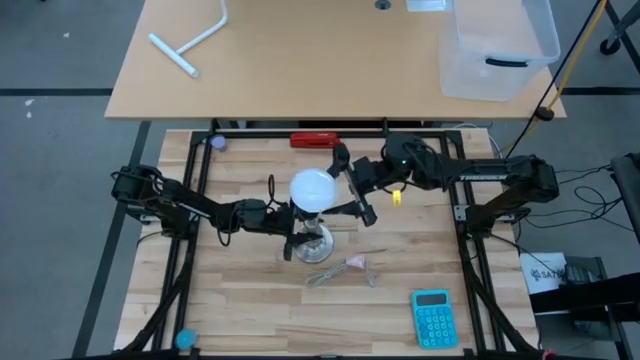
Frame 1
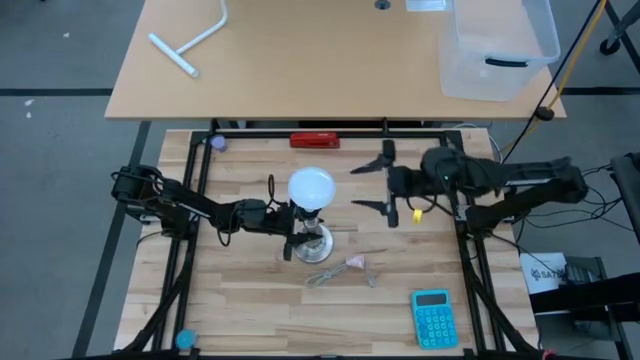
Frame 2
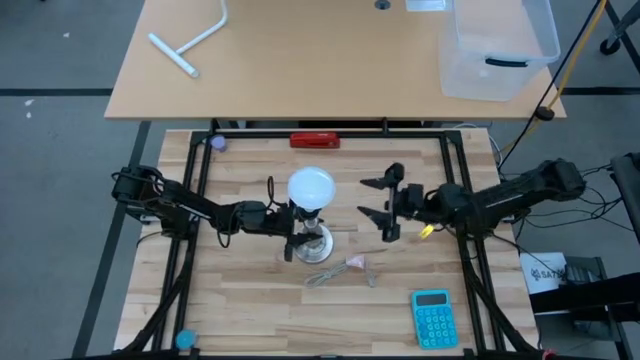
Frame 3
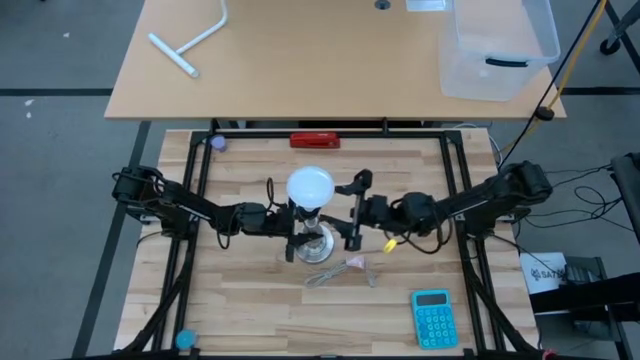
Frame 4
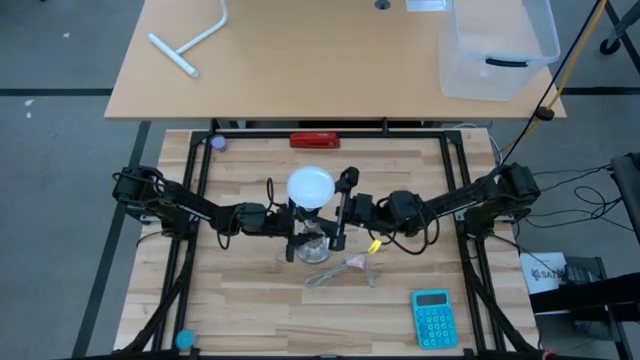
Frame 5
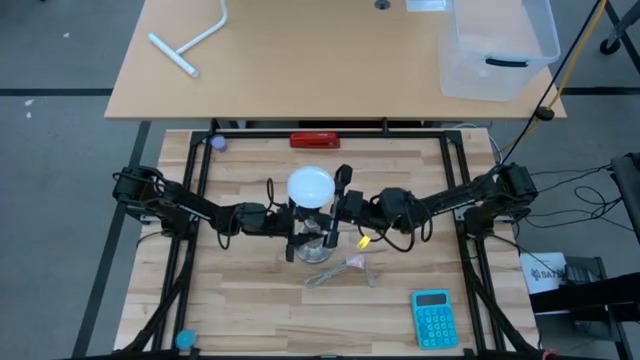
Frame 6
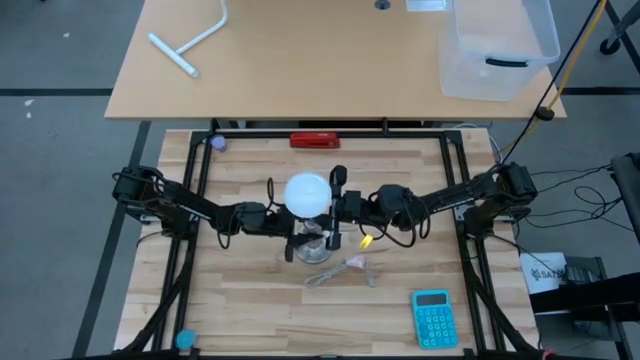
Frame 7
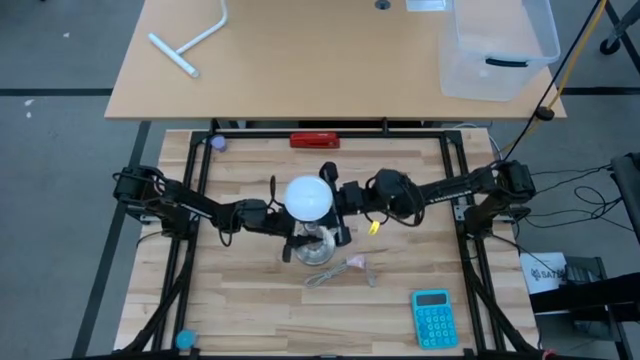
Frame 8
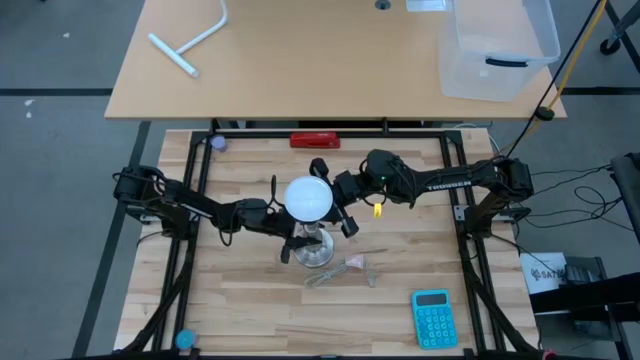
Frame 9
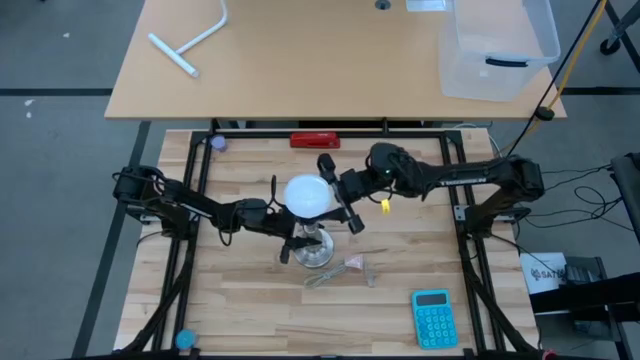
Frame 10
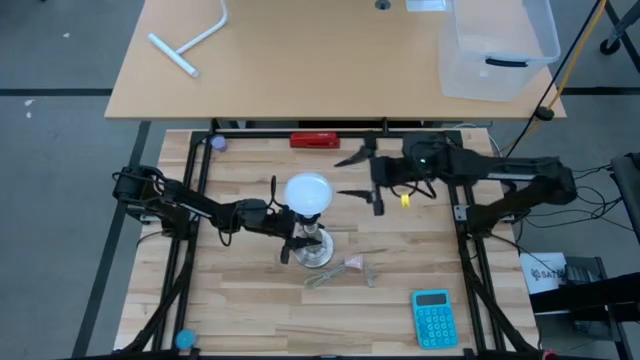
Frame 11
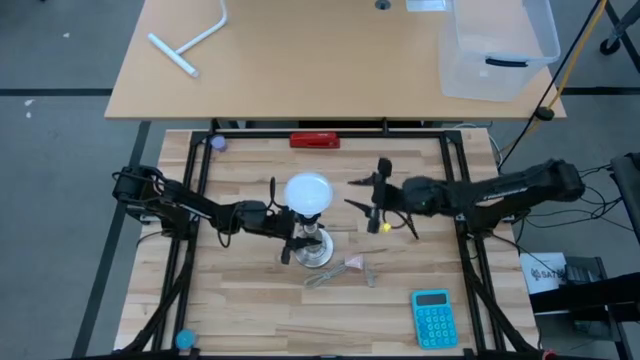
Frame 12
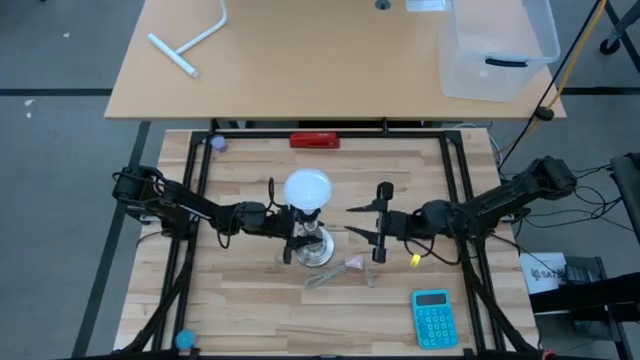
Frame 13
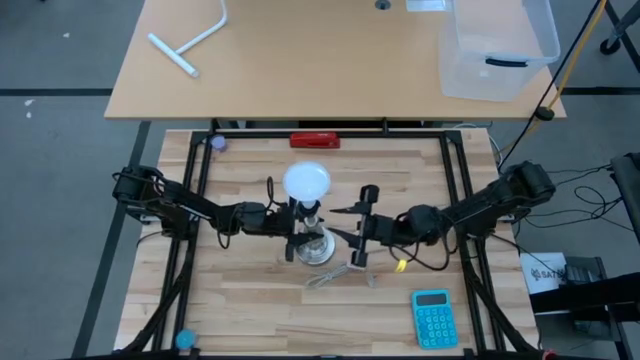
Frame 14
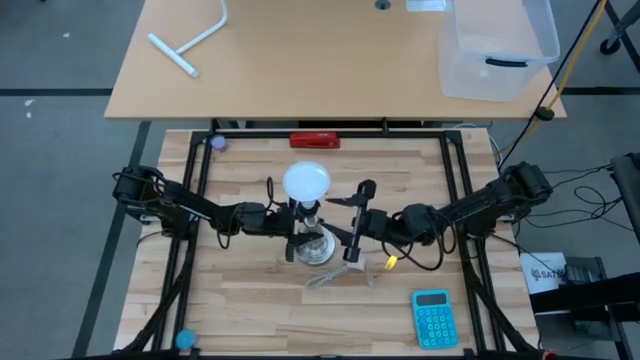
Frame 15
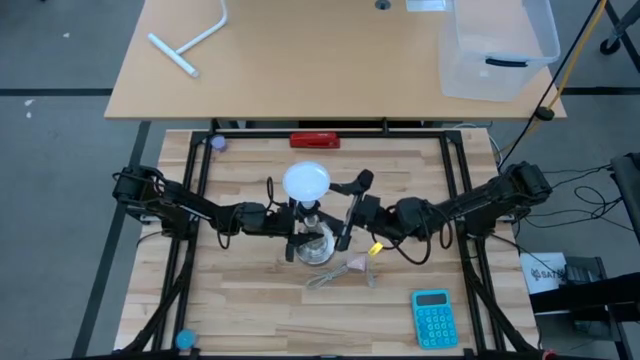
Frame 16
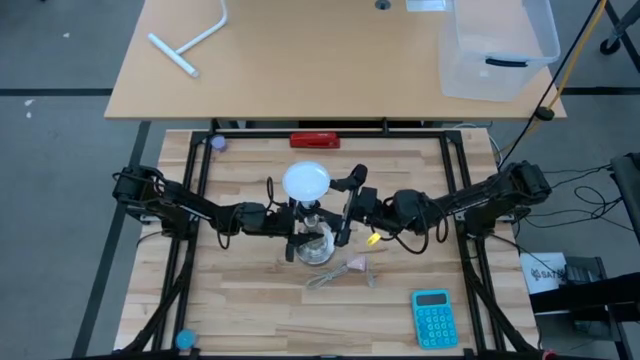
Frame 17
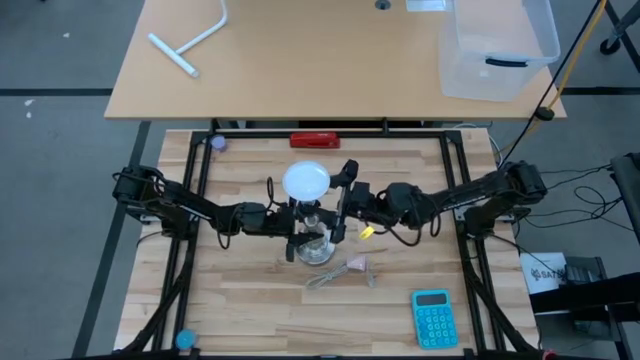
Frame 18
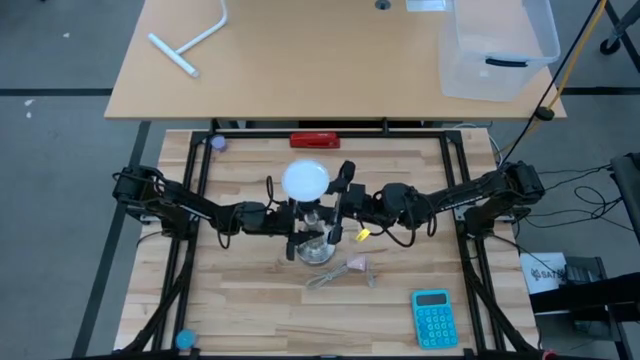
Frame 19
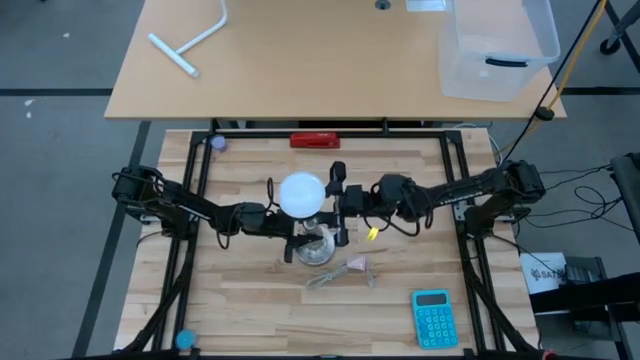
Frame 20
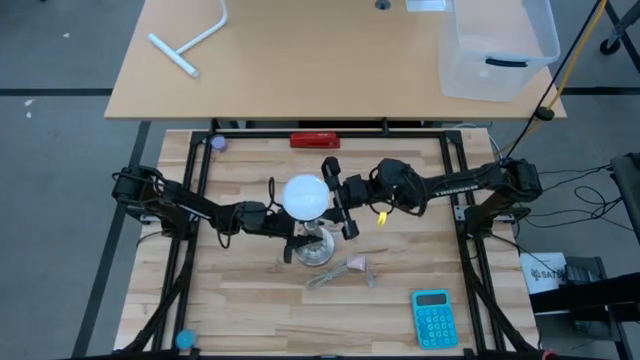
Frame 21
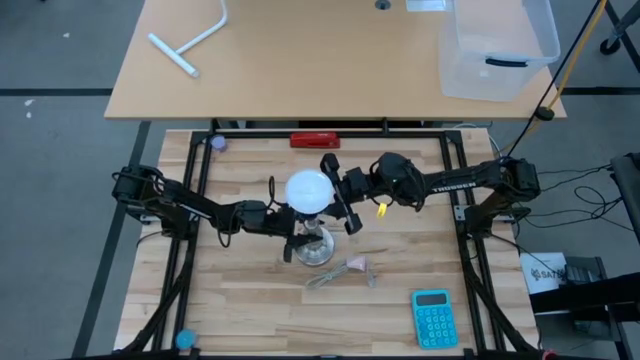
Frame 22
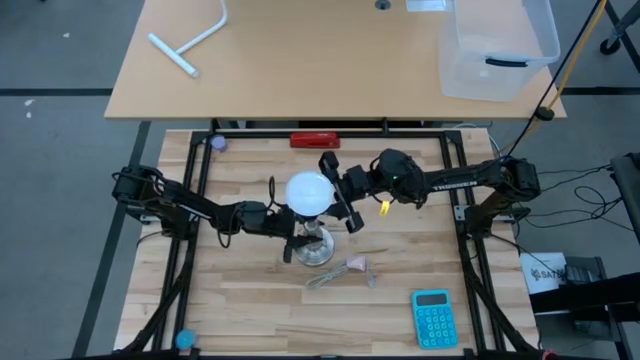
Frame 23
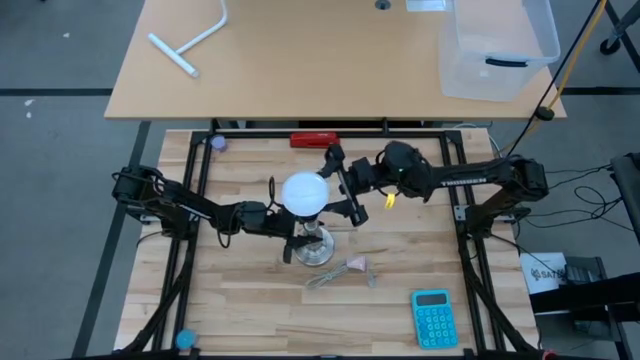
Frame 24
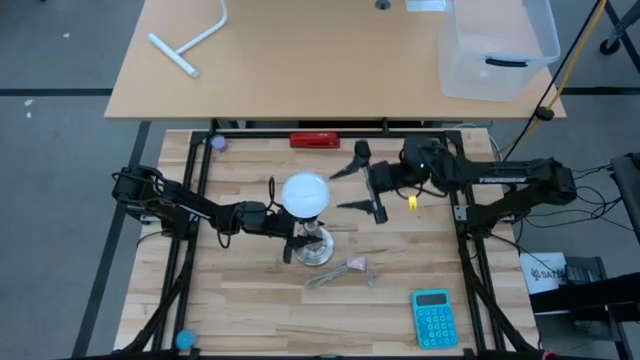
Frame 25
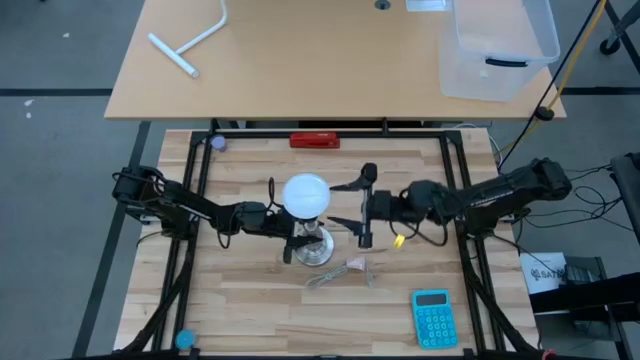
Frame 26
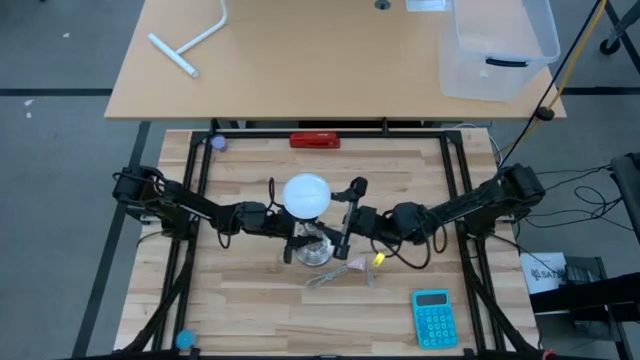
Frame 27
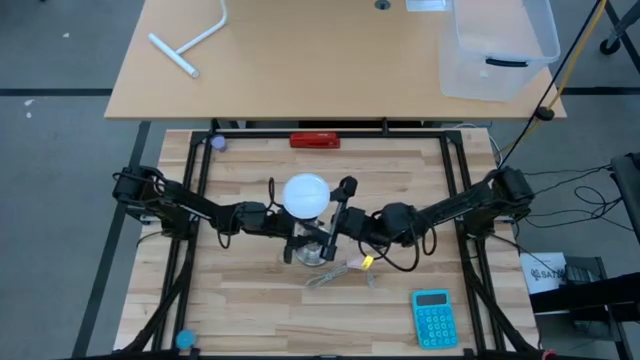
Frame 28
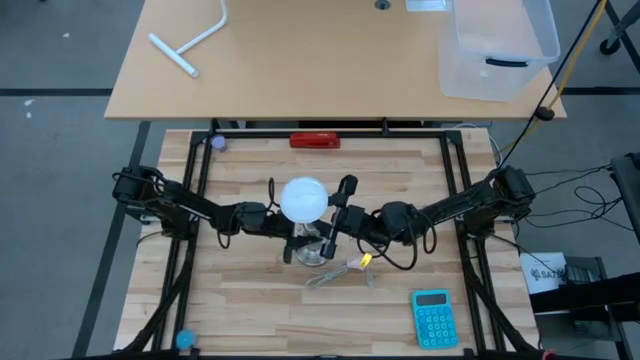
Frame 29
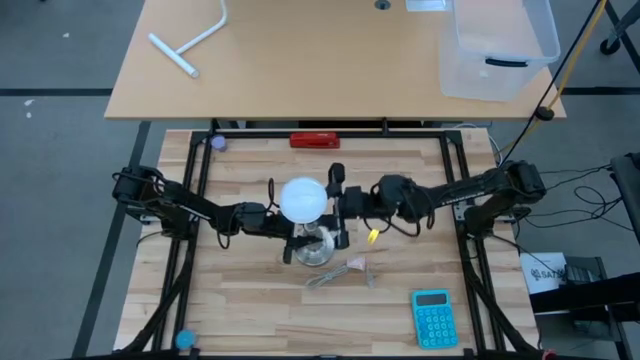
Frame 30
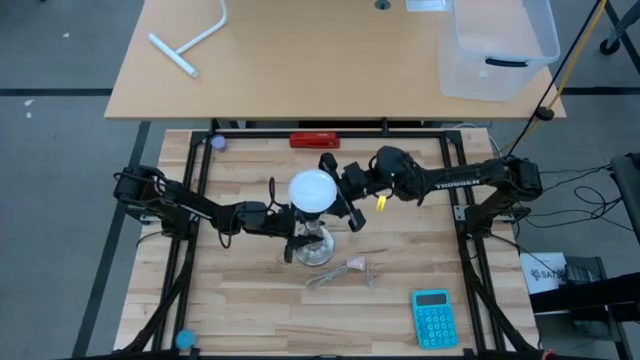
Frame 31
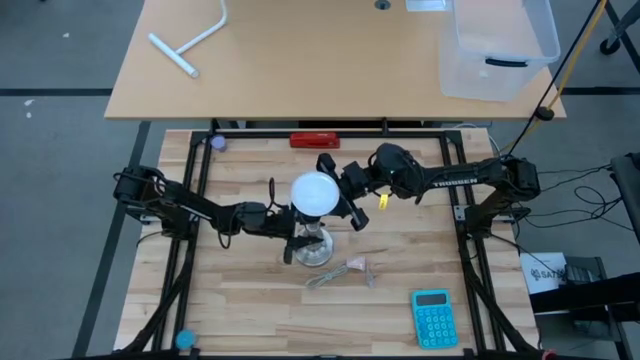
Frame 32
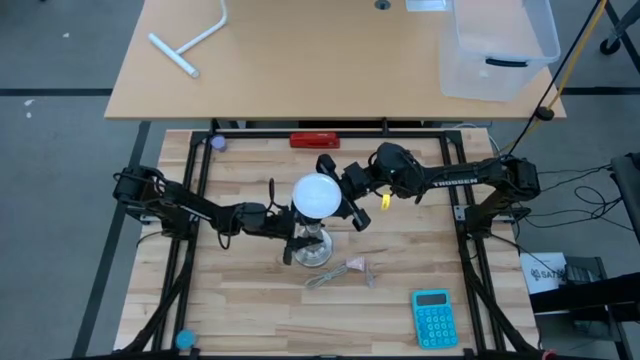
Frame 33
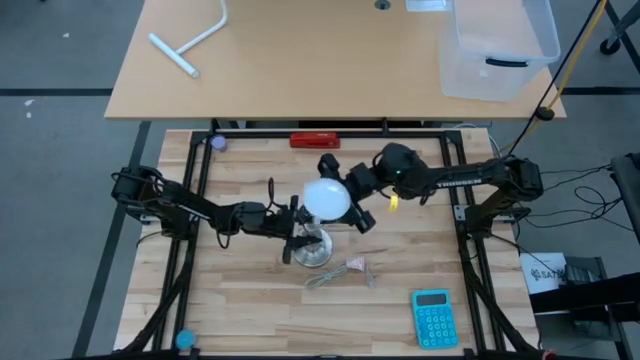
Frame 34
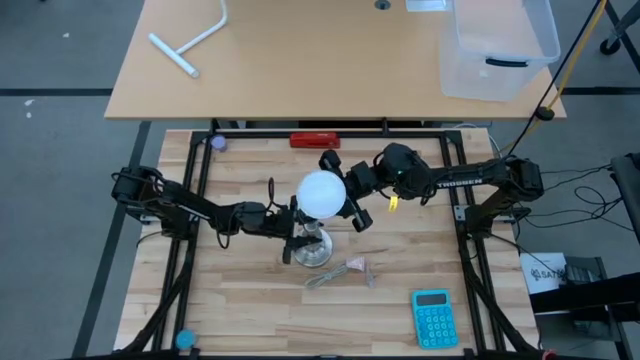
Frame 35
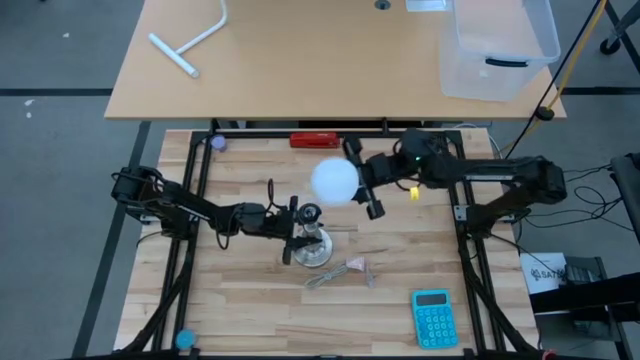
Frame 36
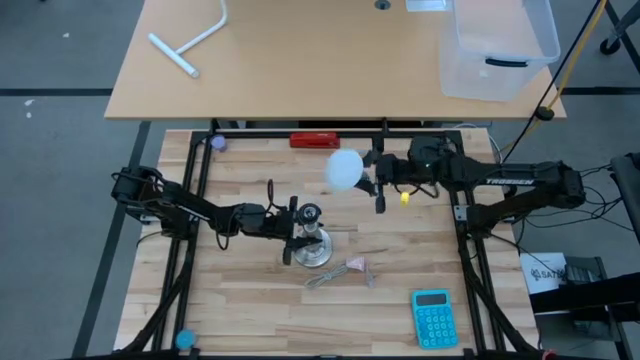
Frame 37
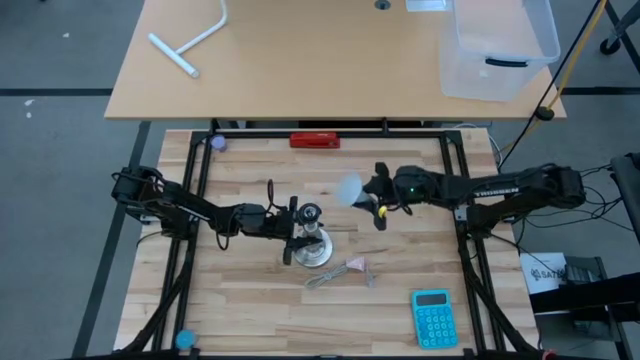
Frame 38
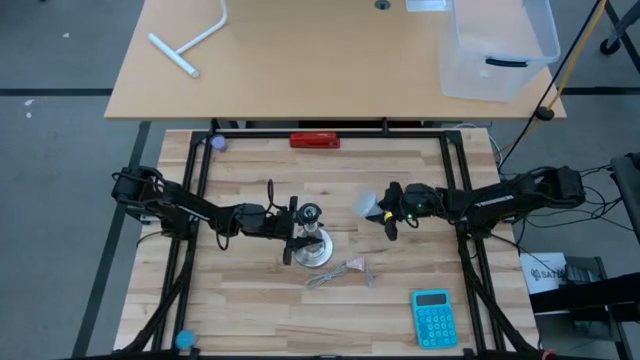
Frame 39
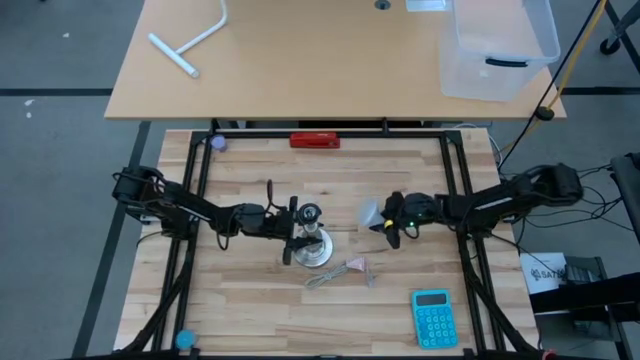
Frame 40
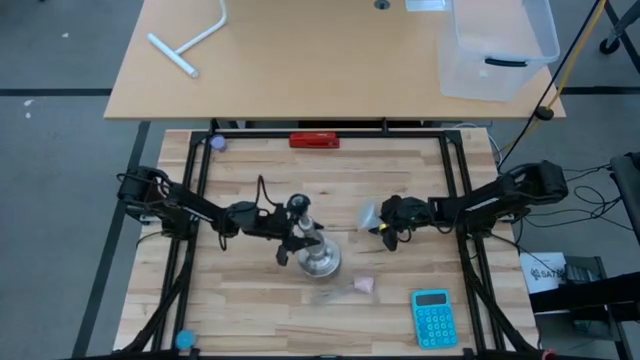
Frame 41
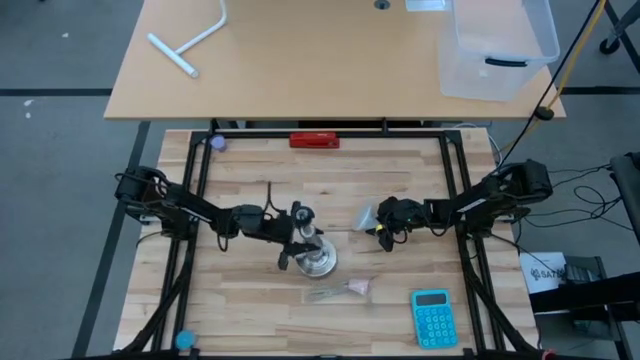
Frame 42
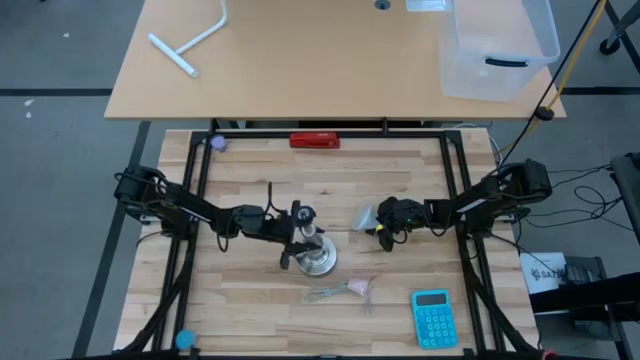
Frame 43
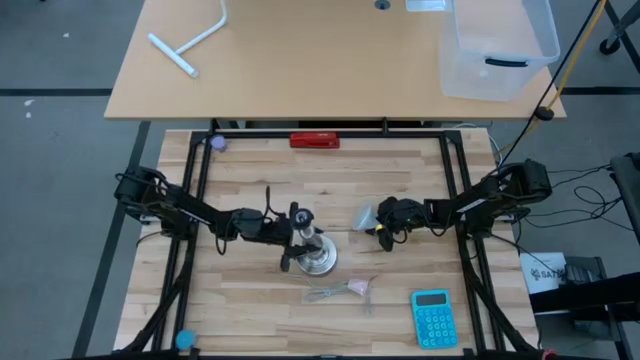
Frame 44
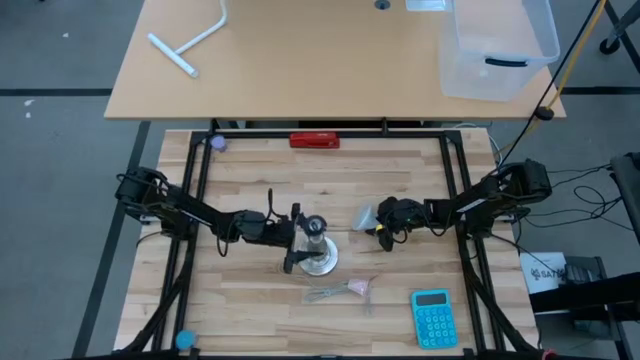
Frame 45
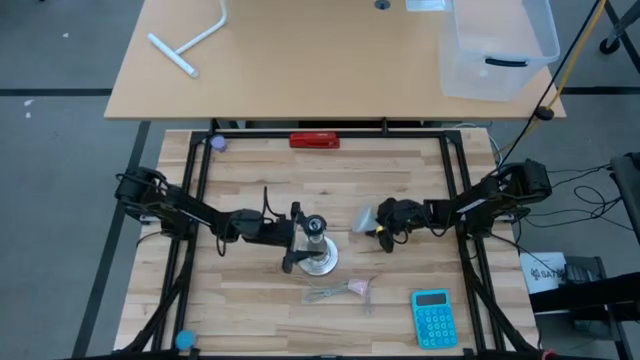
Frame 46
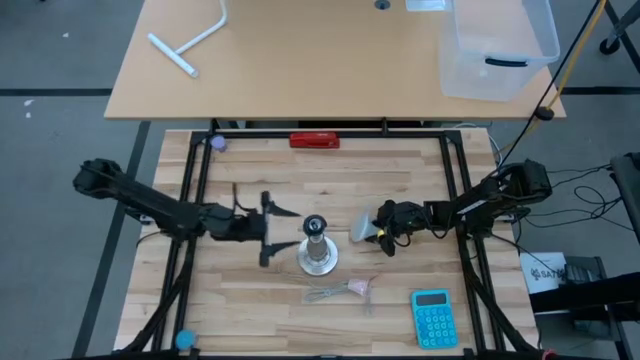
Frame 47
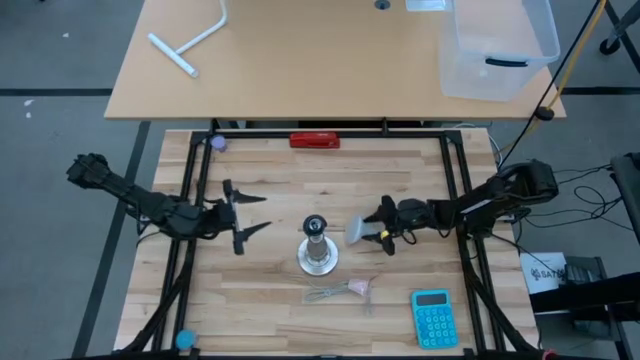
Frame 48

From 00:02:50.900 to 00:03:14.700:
Task: Screw lightbulb
Remove the white lightbulb from the silver lamp
